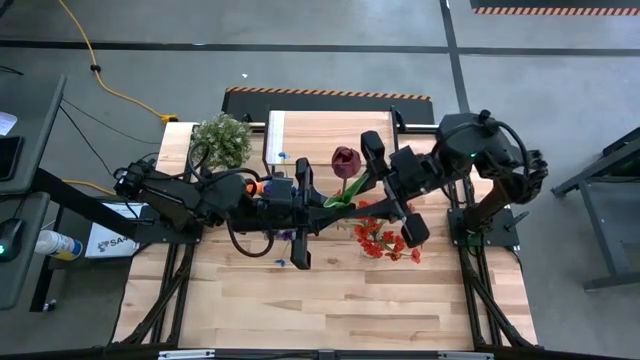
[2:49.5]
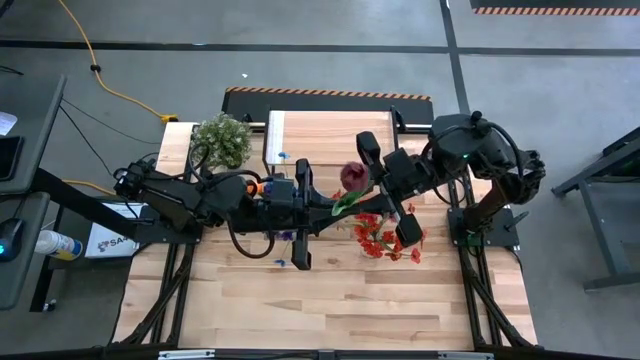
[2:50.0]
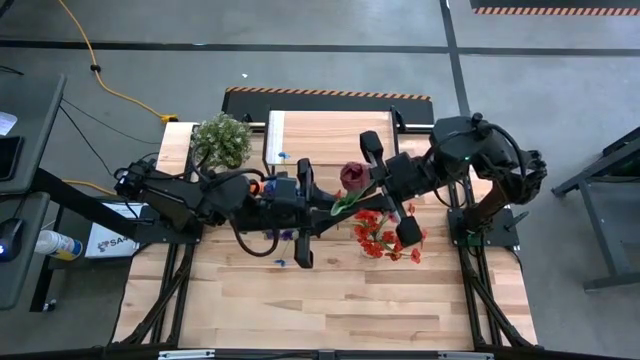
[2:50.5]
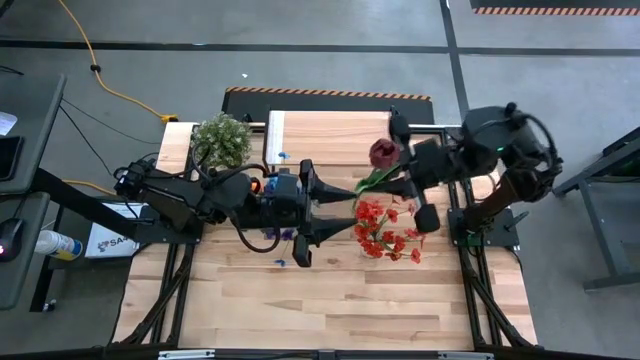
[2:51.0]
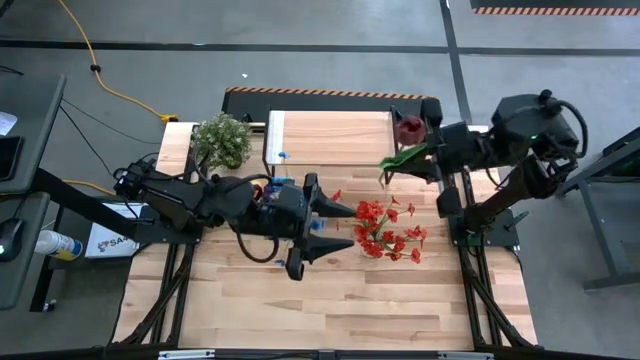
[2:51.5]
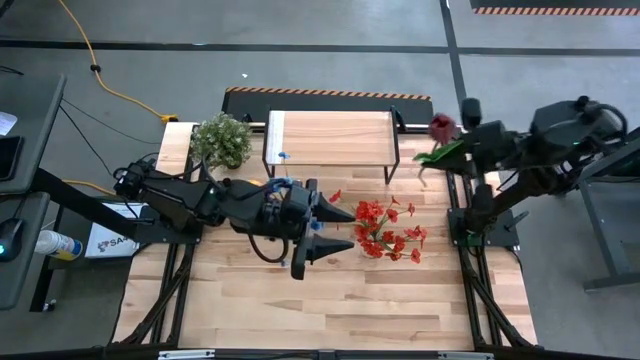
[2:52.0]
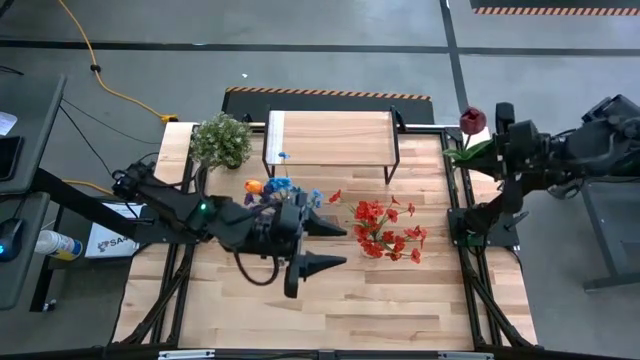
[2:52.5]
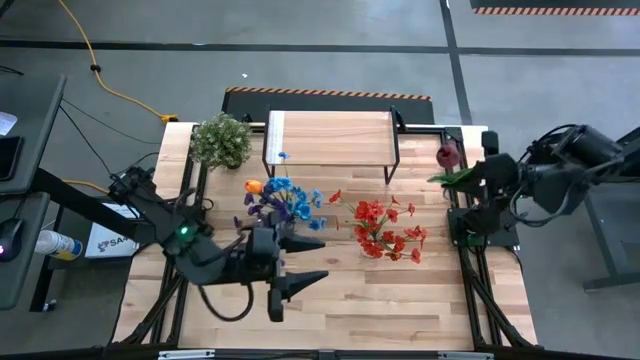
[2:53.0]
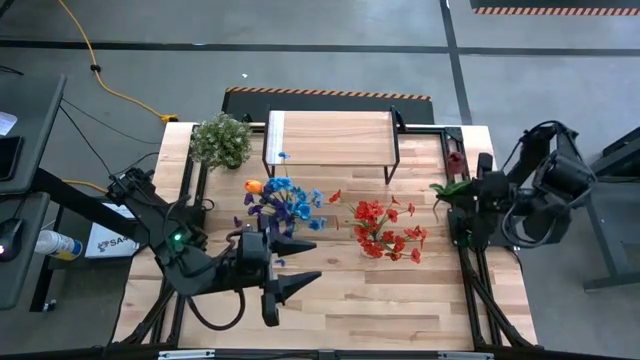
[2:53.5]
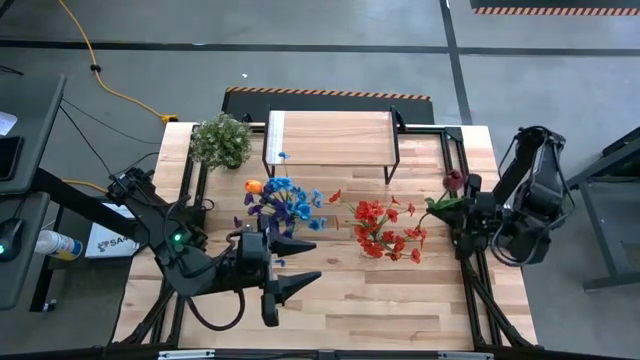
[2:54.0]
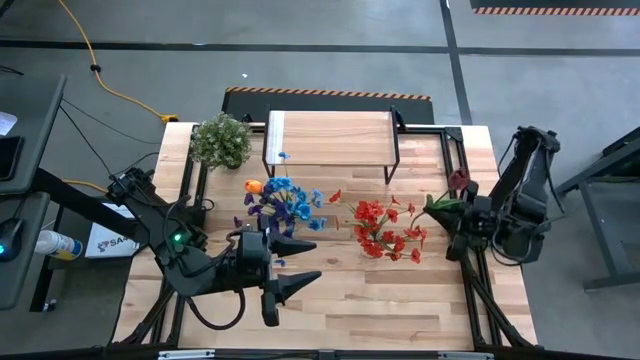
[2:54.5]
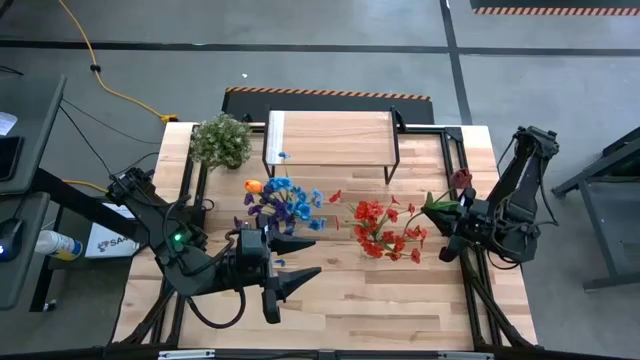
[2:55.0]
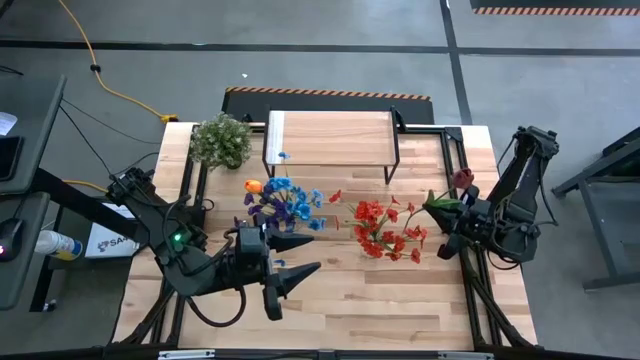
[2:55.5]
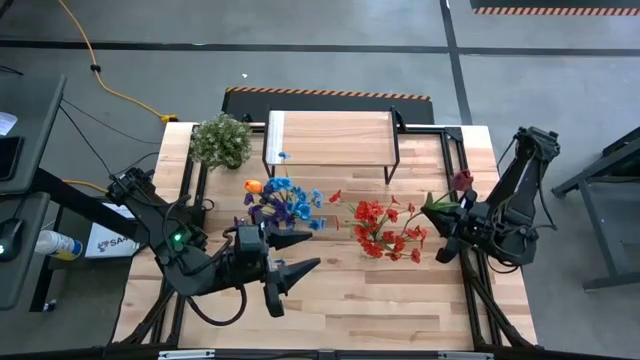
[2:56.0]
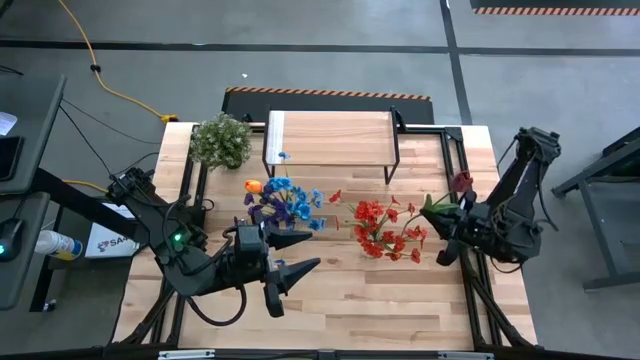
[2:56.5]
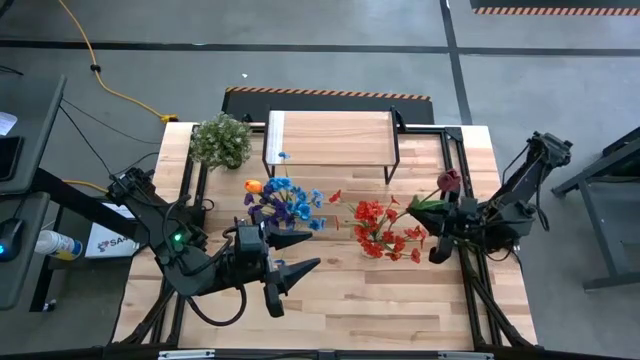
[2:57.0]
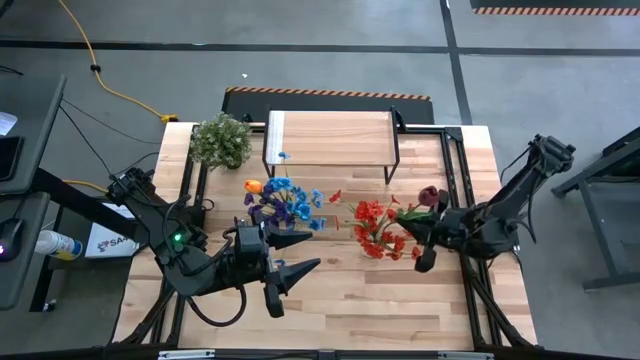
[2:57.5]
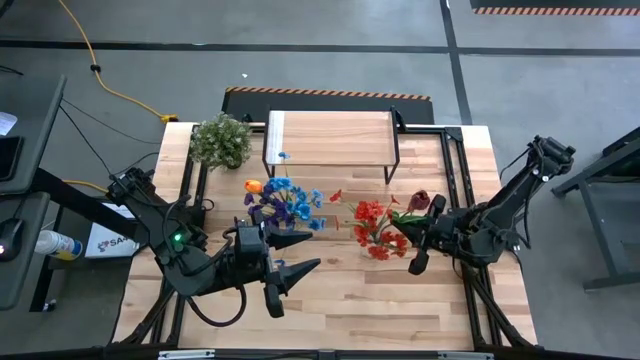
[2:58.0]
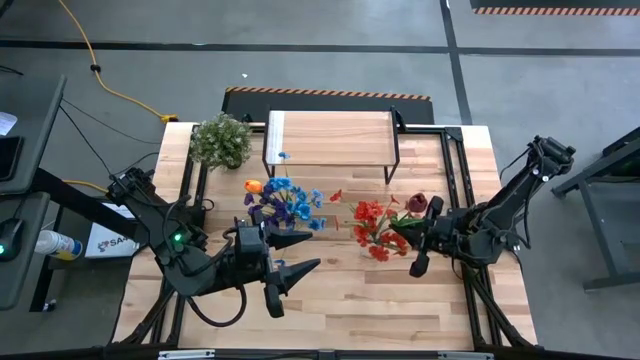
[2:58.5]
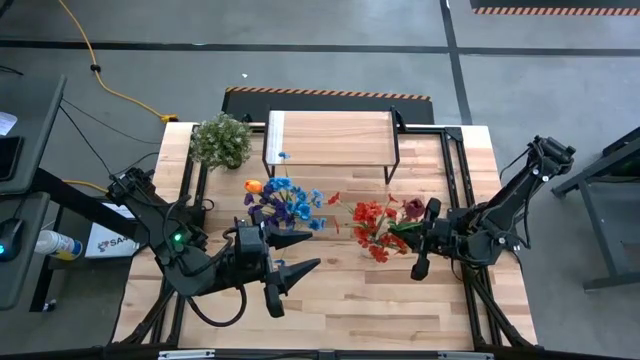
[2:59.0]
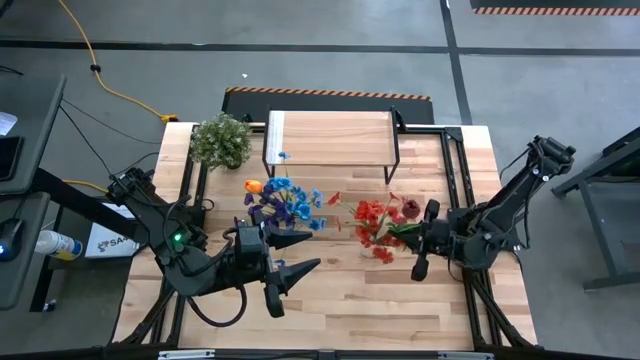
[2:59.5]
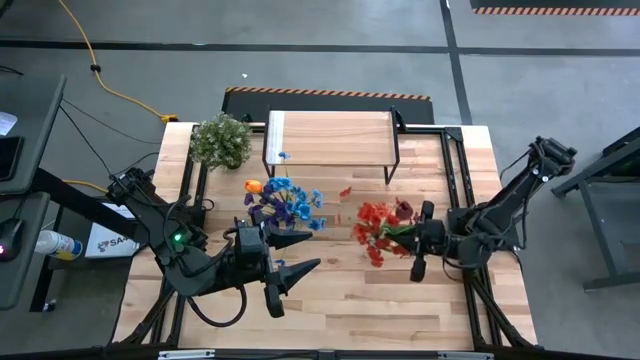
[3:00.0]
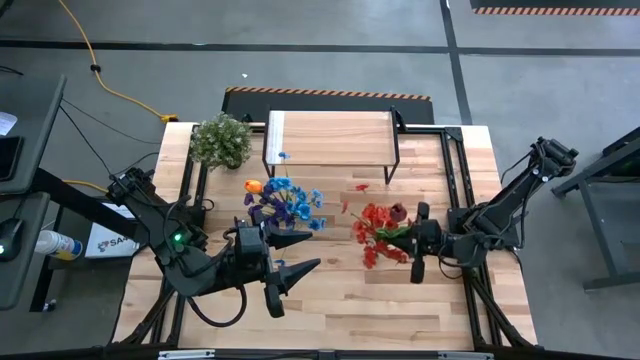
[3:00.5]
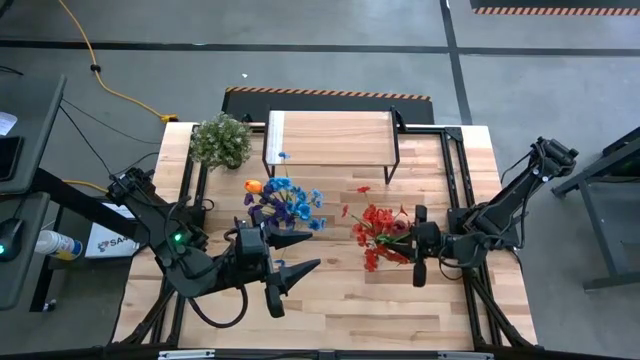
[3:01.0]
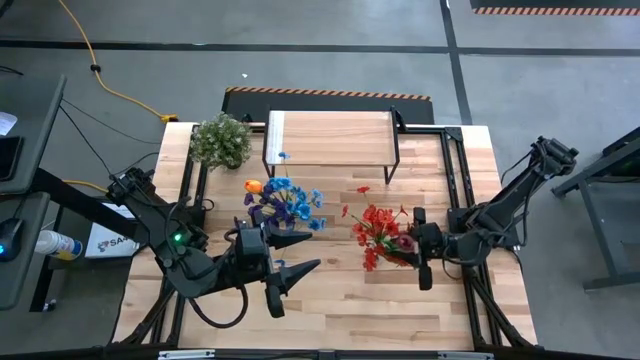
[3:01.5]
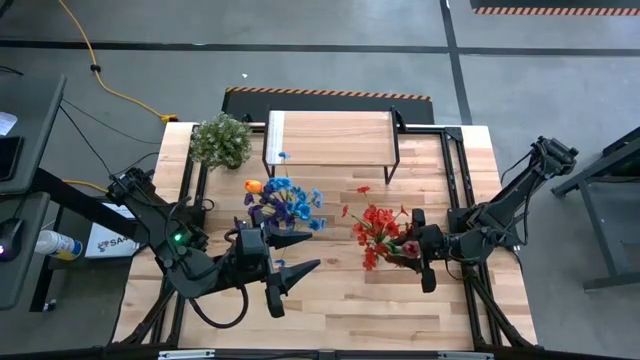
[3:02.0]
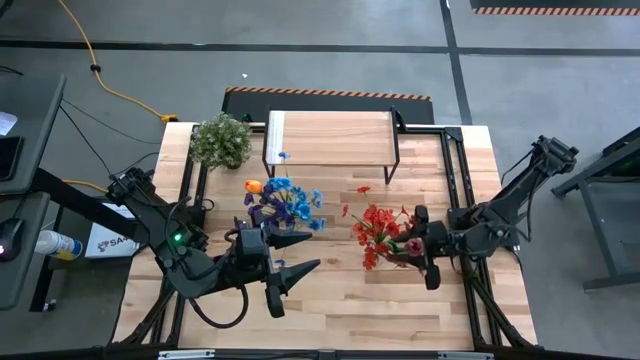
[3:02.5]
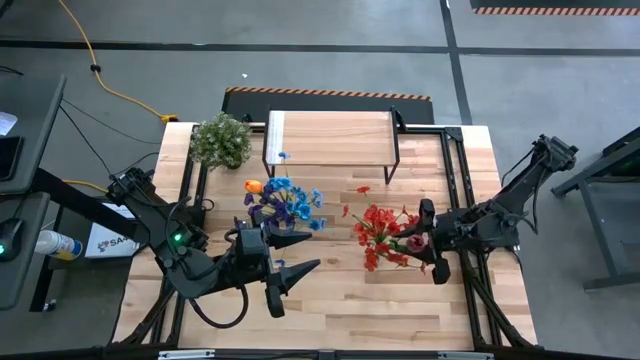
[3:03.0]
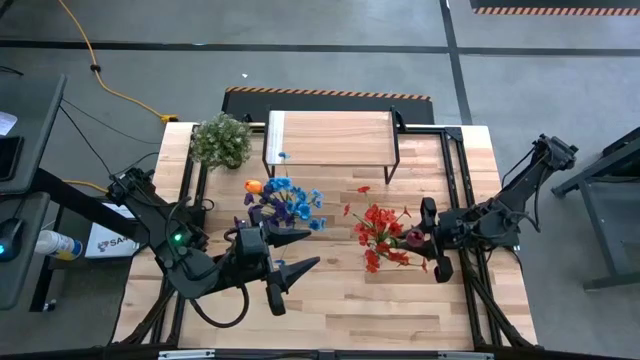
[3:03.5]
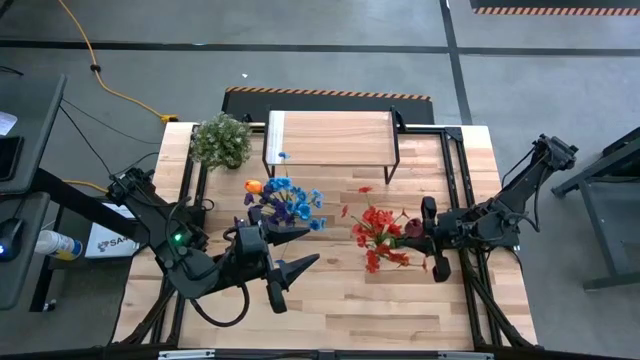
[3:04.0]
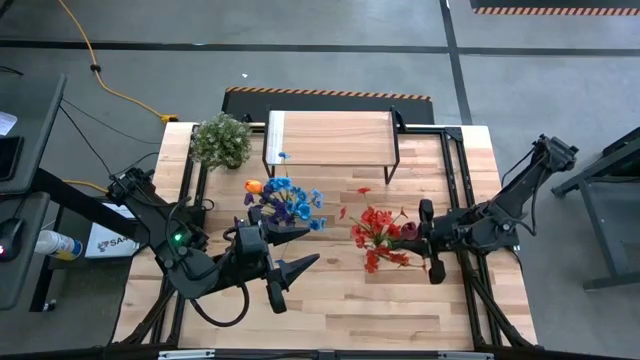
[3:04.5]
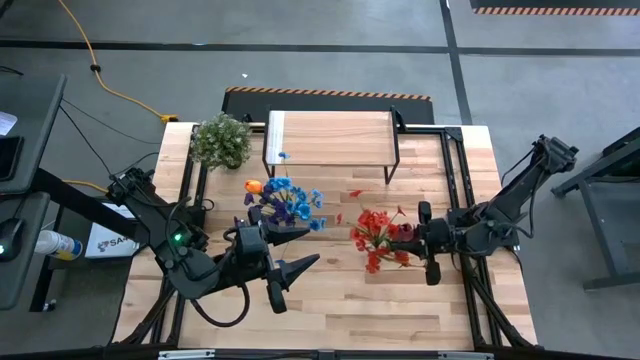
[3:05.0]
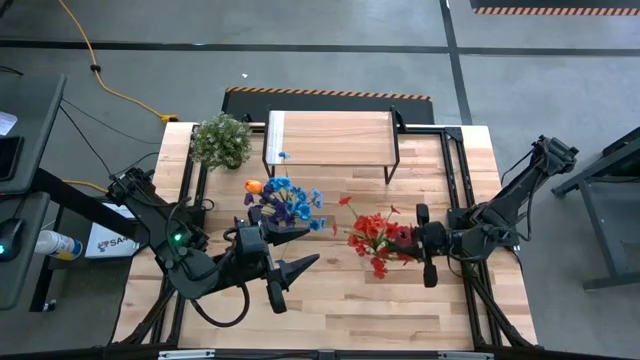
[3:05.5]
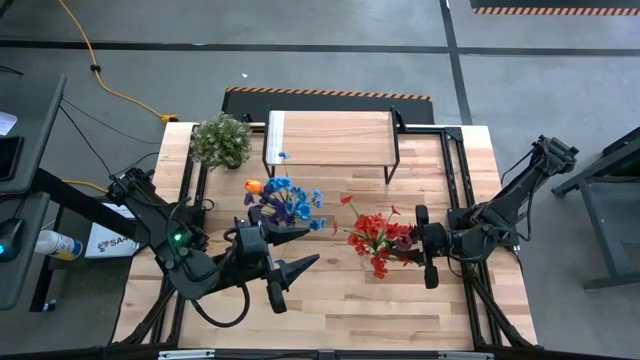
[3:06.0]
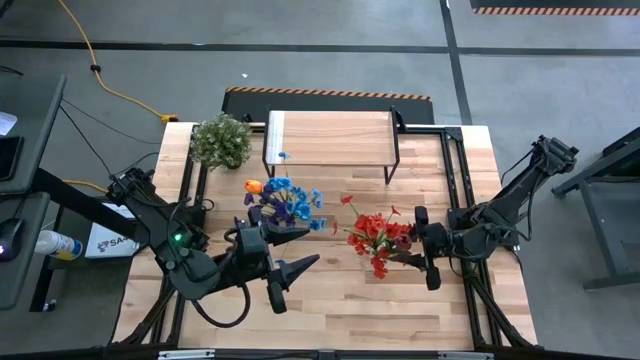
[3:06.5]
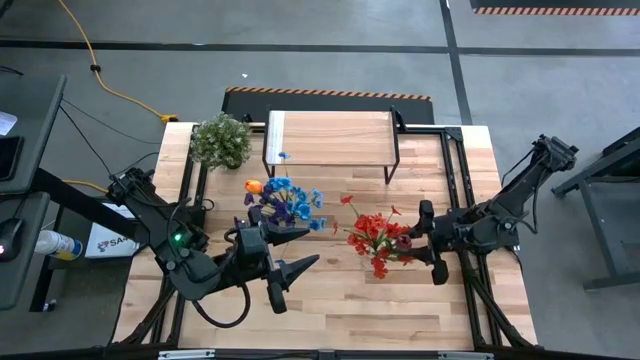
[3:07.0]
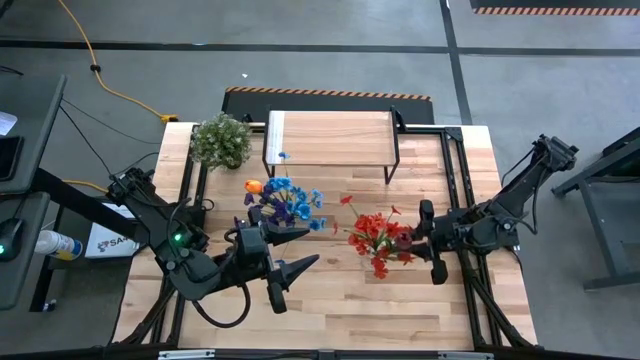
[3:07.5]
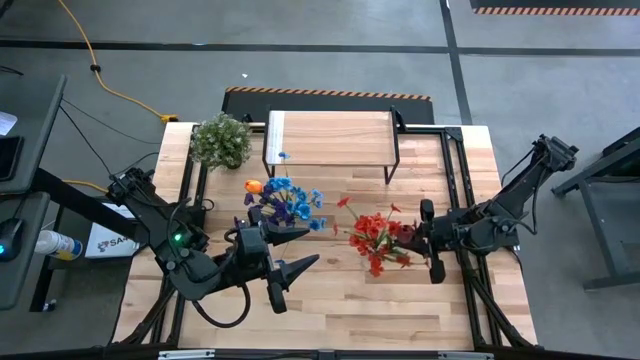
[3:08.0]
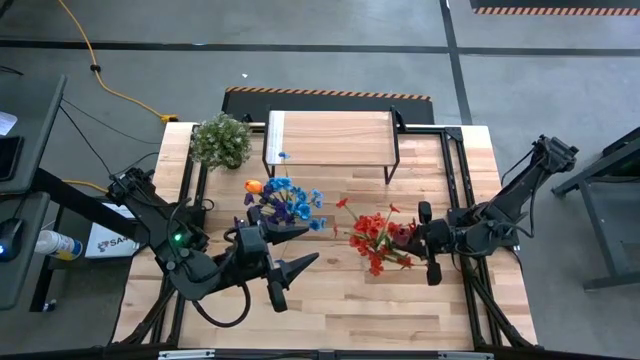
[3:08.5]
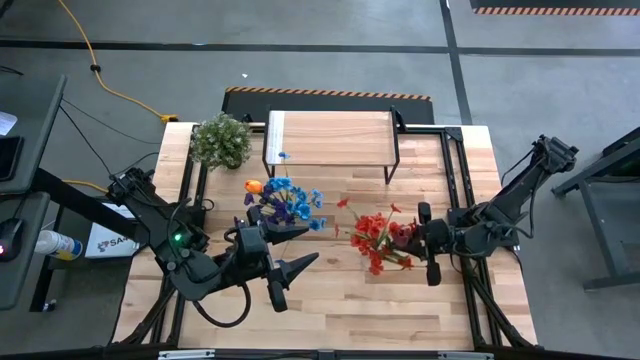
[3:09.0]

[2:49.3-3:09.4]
Task: Pick and place flowers into a vace then onto a shelf
Put the dark red flower into the right transparent vase

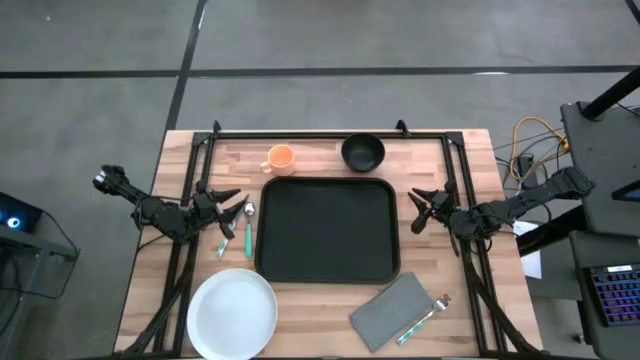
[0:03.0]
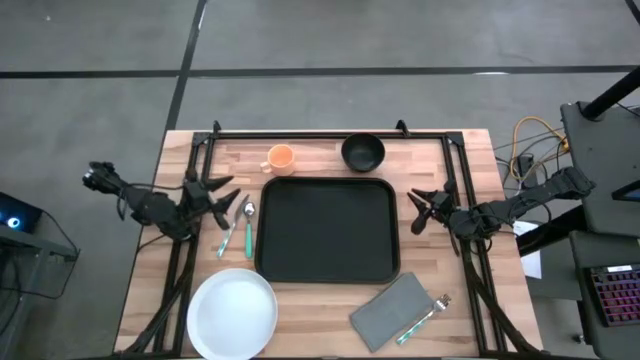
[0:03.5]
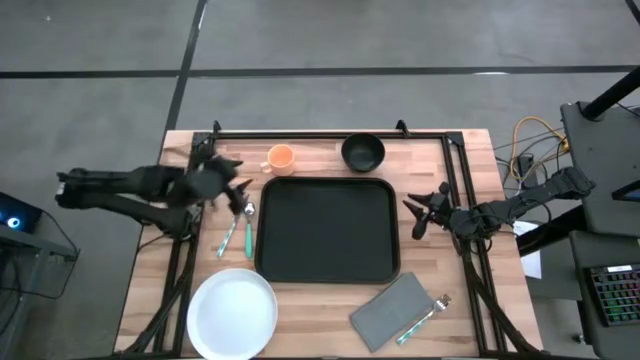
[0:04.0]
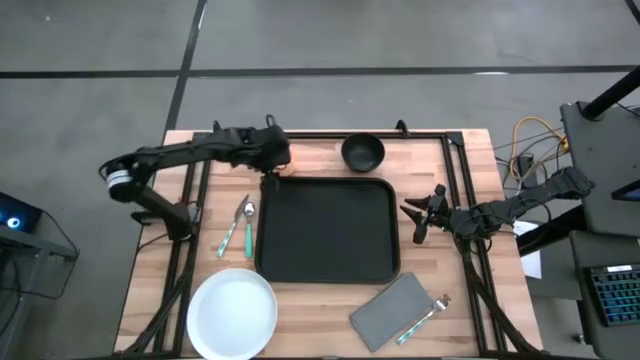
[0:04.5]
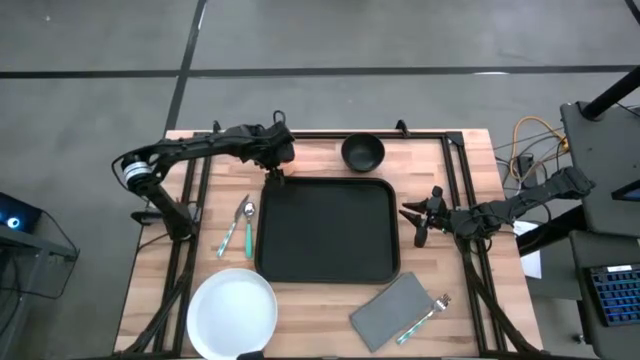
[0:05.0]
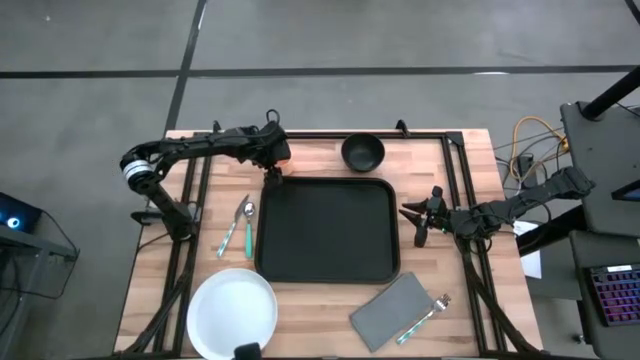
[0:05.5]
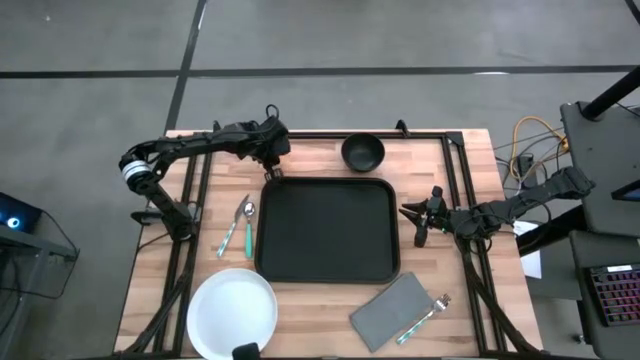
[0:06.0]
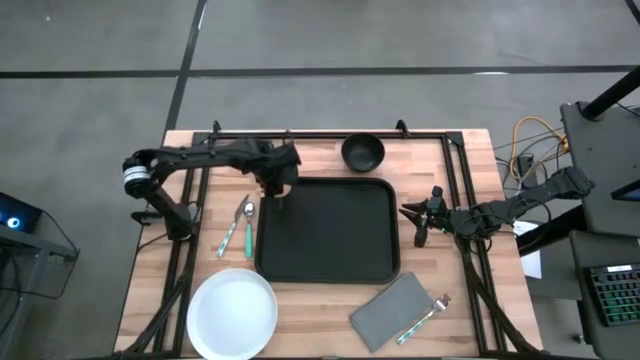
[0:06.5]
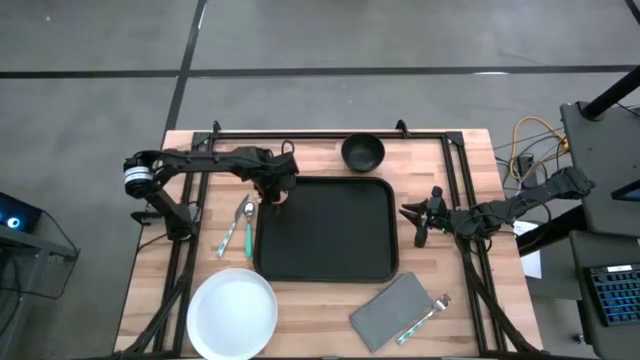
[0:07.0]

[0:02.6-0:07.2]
Task: Set up tray
Put the yellow mug on the black serving tray
